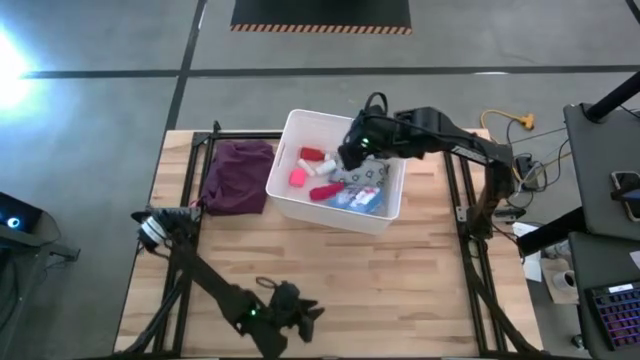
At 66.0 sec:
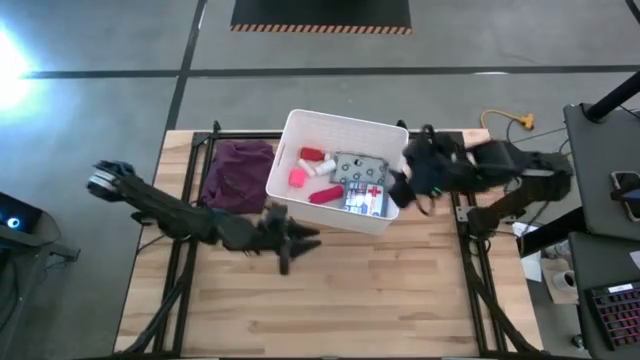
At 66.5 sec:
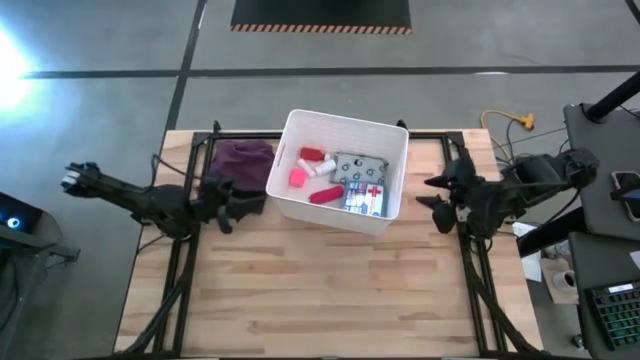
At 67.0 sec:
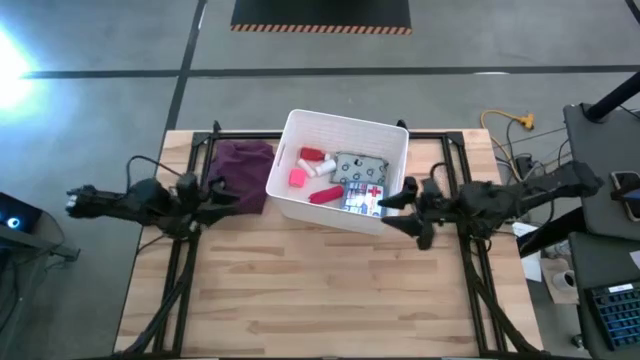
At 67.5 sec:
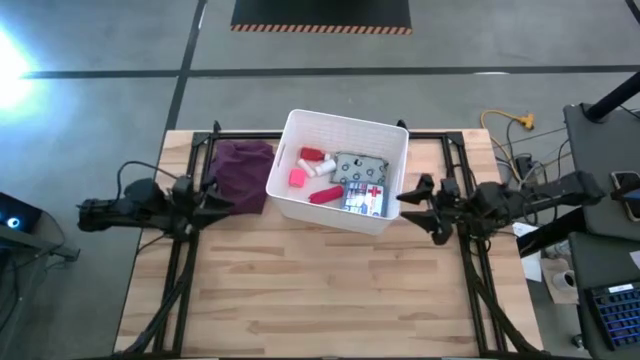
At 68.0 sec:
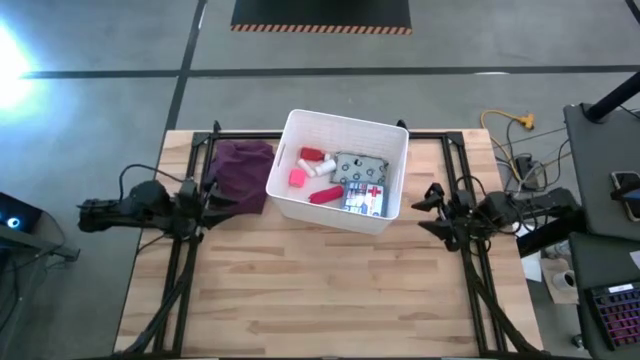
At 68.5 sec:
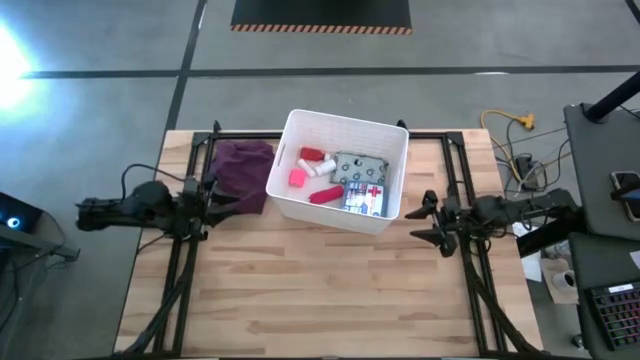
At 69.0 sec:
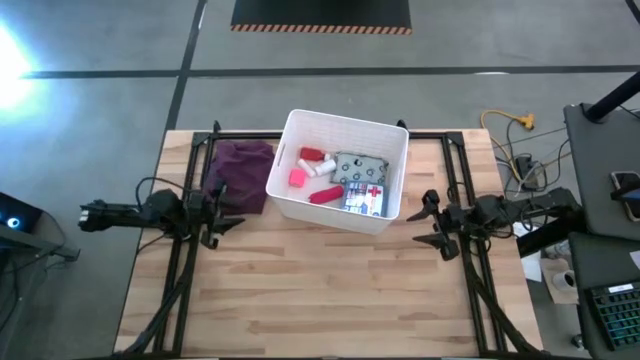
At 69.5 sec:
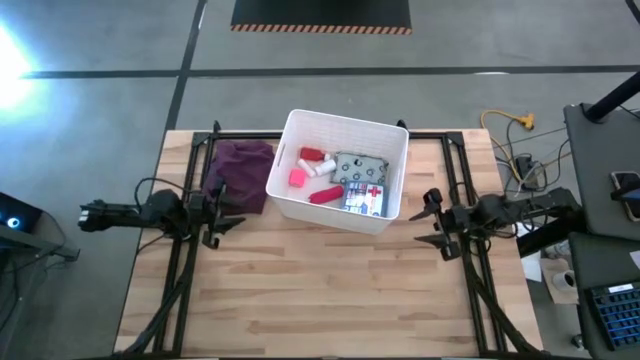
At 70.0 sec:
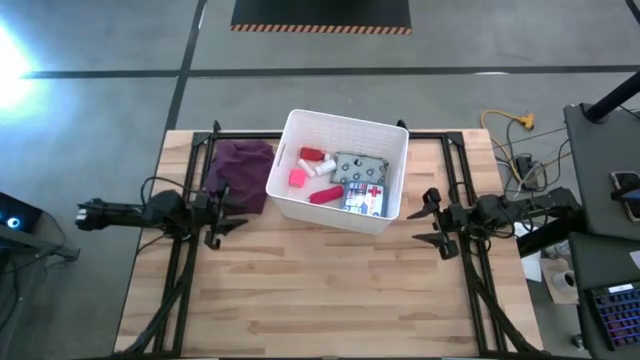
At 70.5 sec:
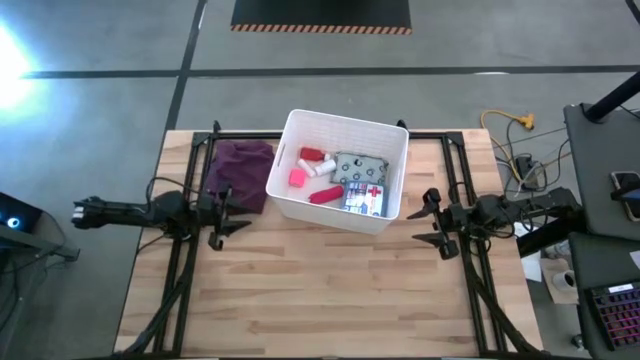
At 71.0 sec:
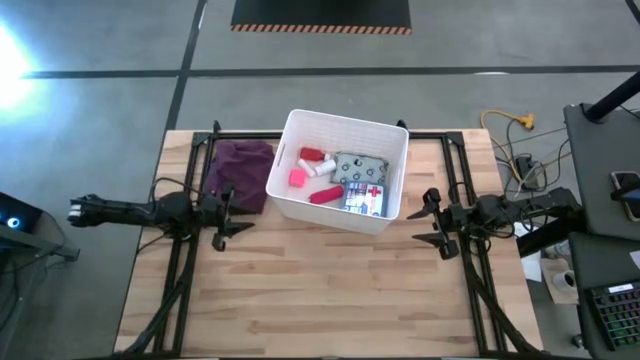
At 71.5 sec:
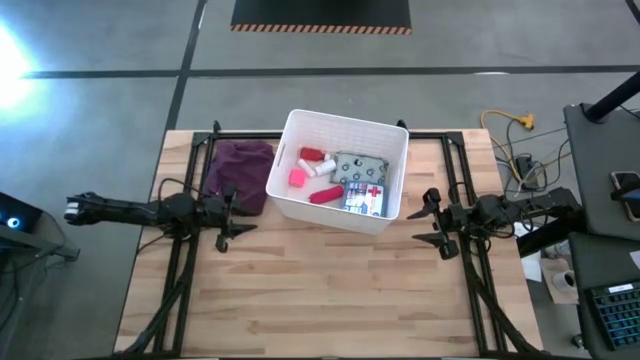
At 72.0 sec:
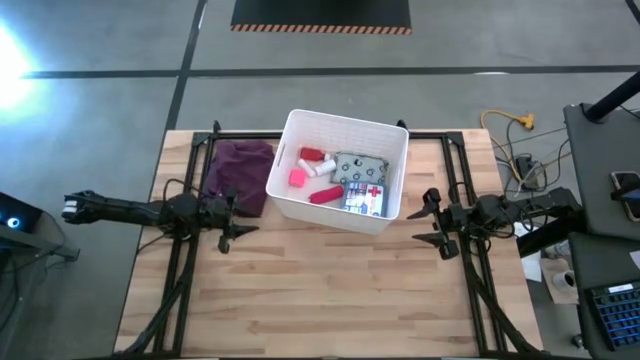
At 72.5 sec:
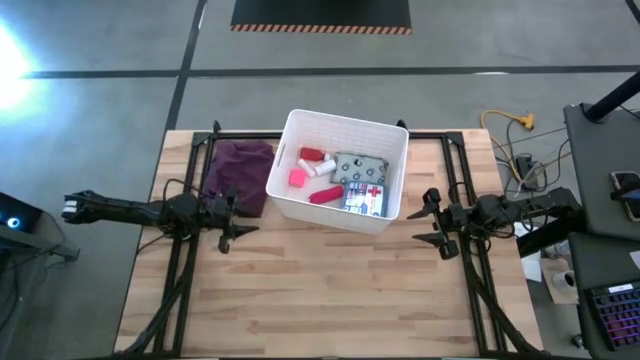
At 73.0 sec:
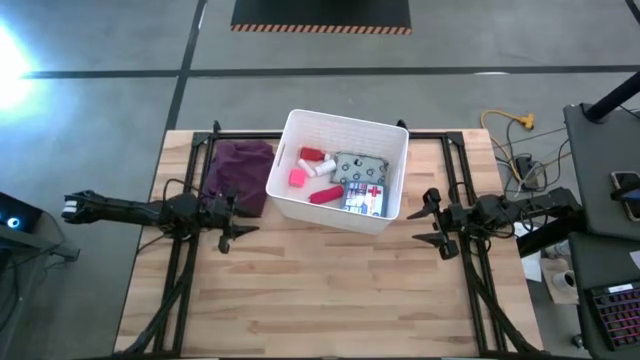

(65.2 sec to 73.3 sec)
Task: Pick & place medical supplies in basket/bin
Return to Home Position

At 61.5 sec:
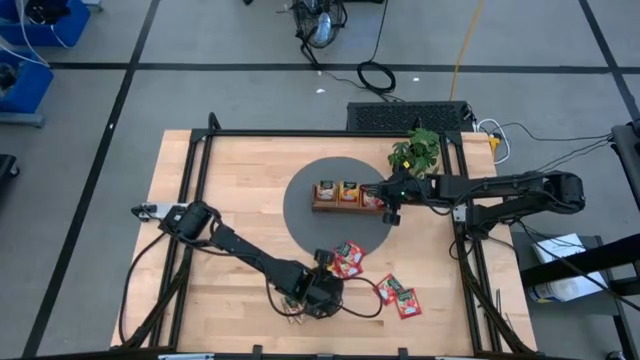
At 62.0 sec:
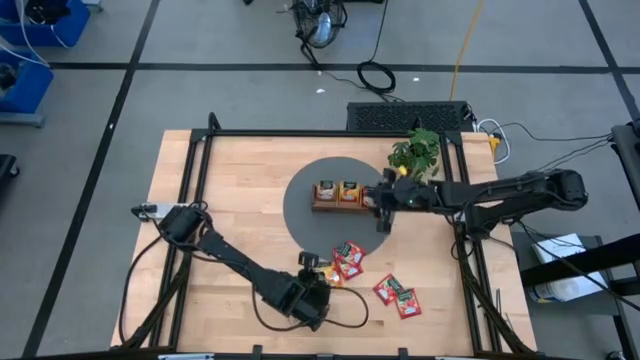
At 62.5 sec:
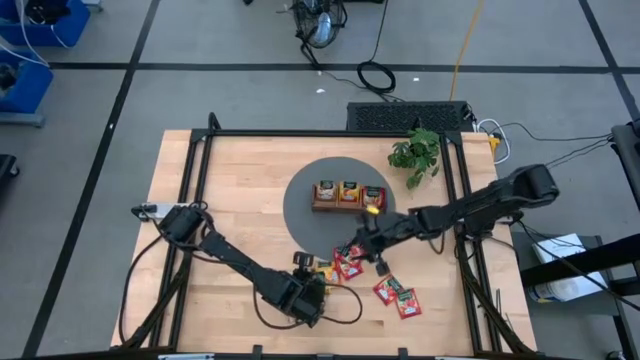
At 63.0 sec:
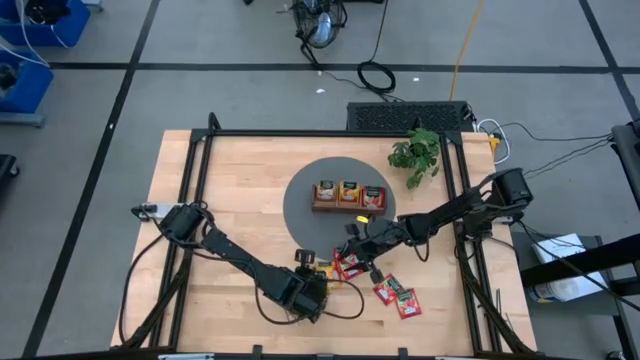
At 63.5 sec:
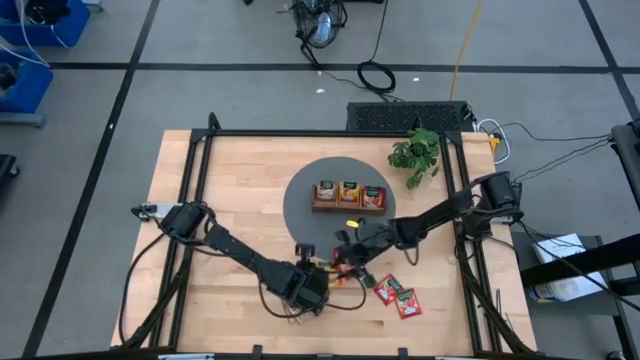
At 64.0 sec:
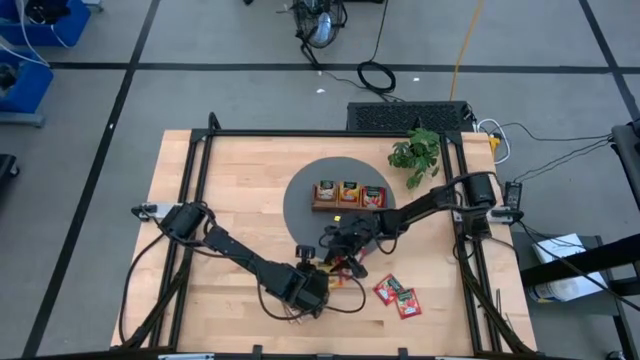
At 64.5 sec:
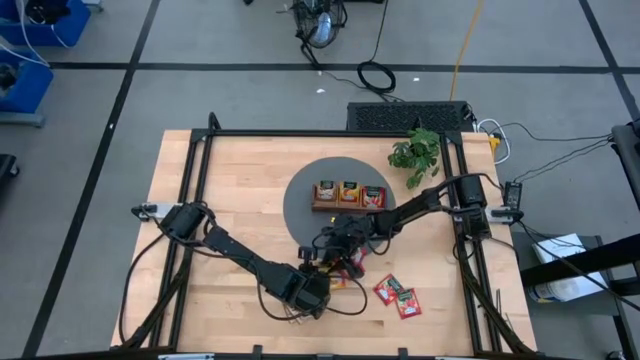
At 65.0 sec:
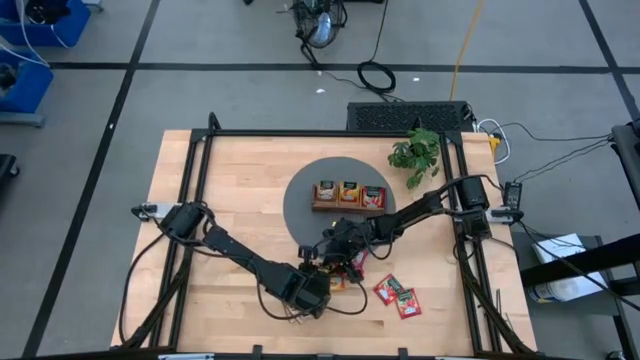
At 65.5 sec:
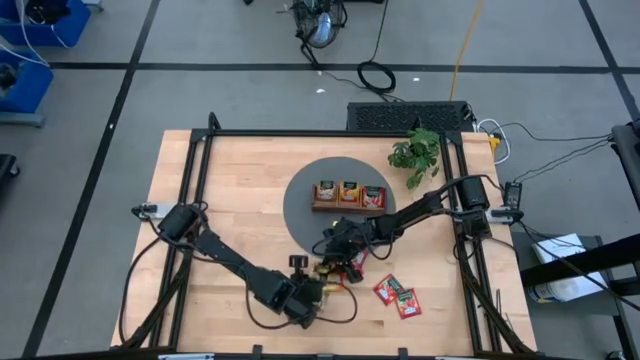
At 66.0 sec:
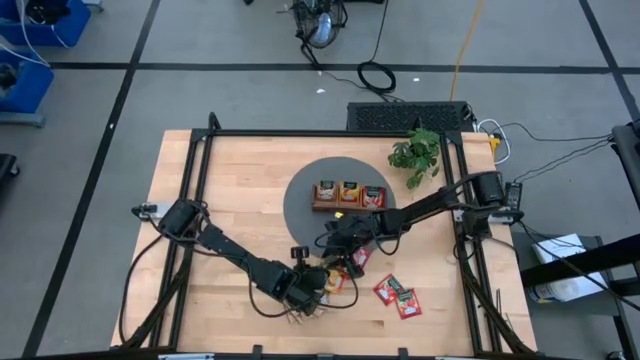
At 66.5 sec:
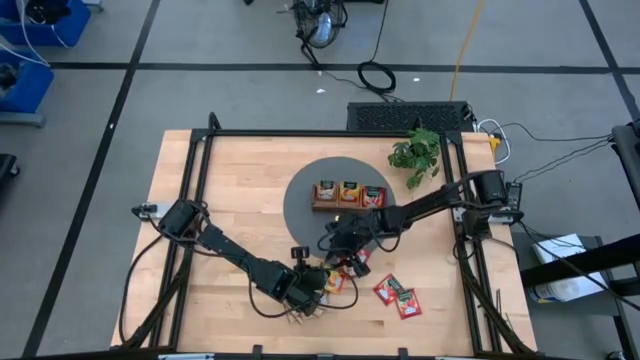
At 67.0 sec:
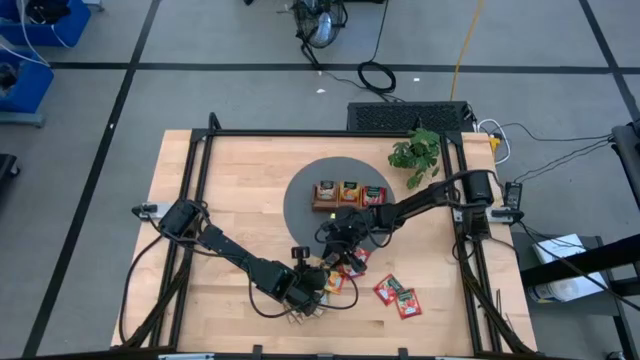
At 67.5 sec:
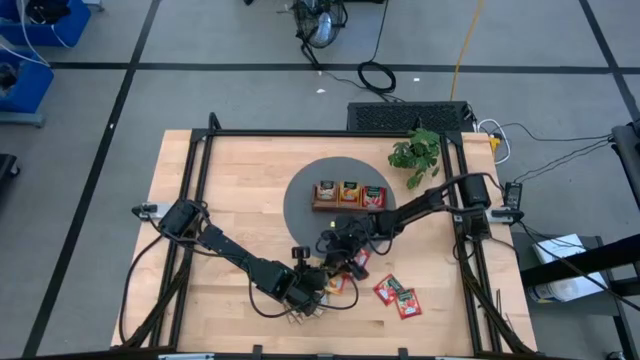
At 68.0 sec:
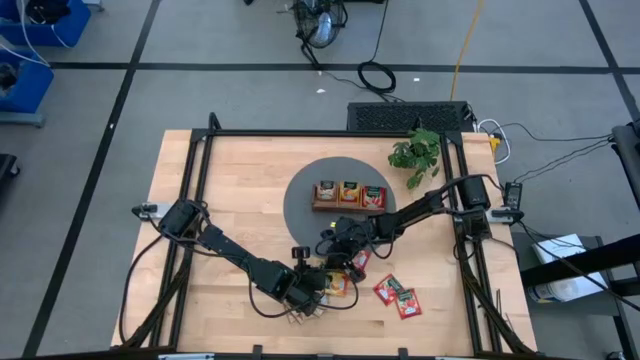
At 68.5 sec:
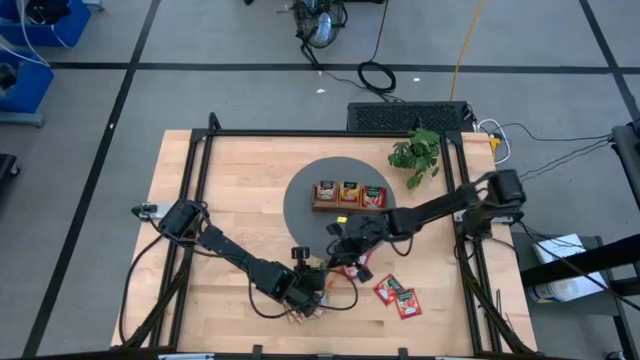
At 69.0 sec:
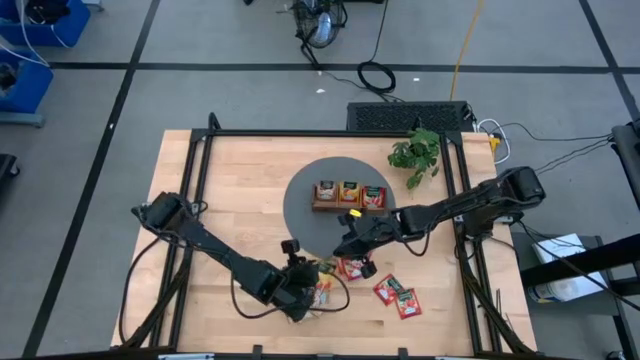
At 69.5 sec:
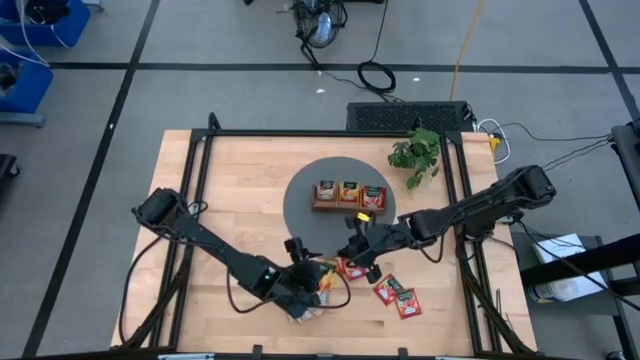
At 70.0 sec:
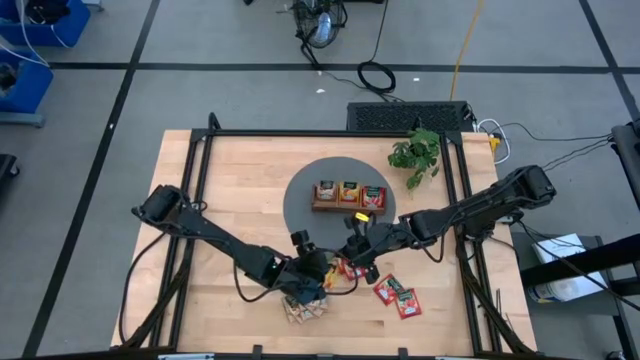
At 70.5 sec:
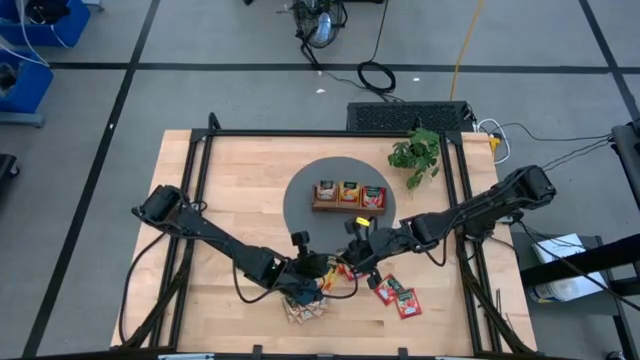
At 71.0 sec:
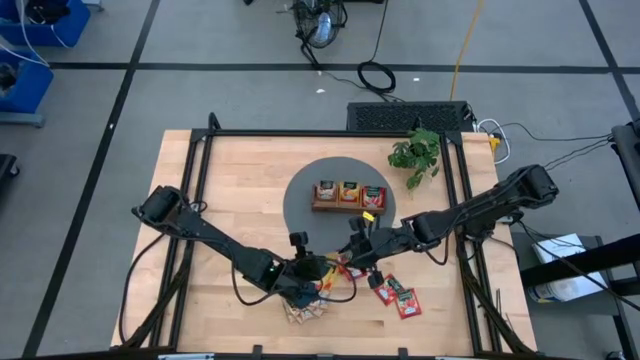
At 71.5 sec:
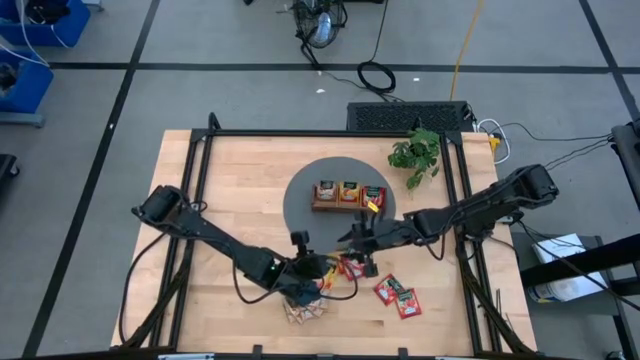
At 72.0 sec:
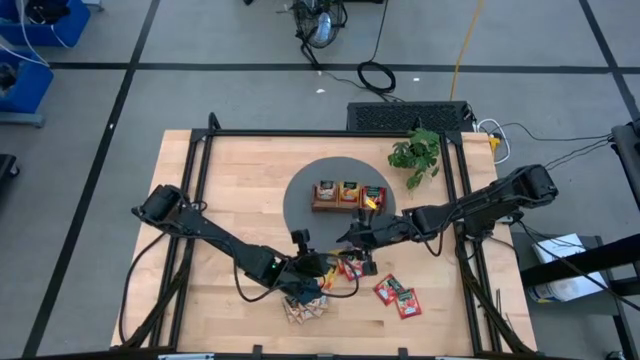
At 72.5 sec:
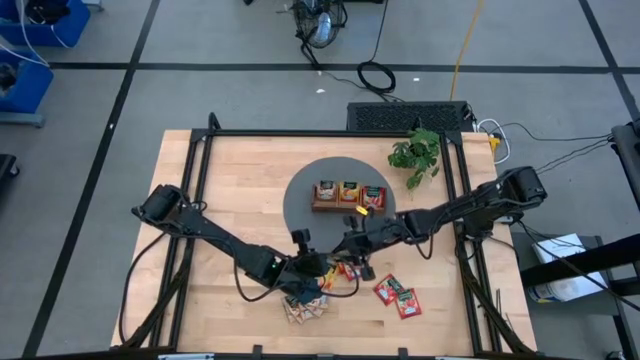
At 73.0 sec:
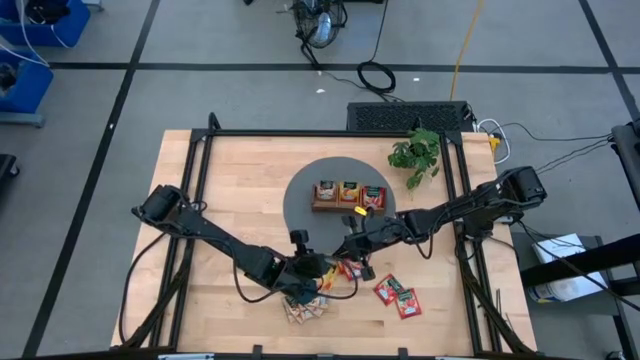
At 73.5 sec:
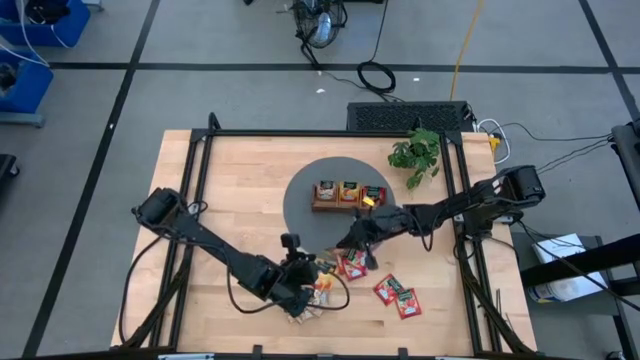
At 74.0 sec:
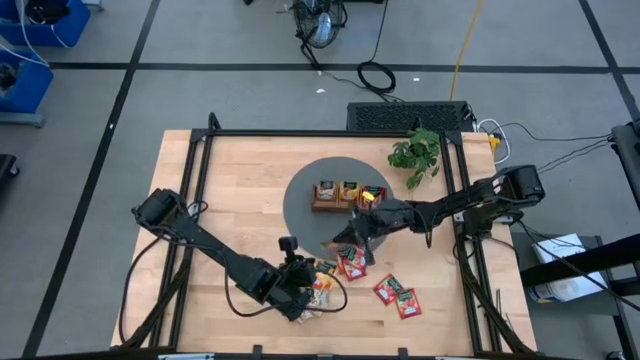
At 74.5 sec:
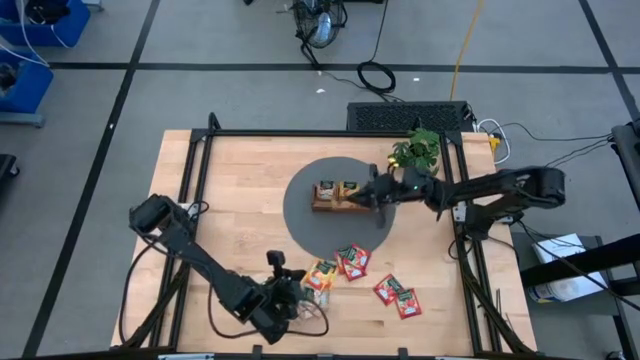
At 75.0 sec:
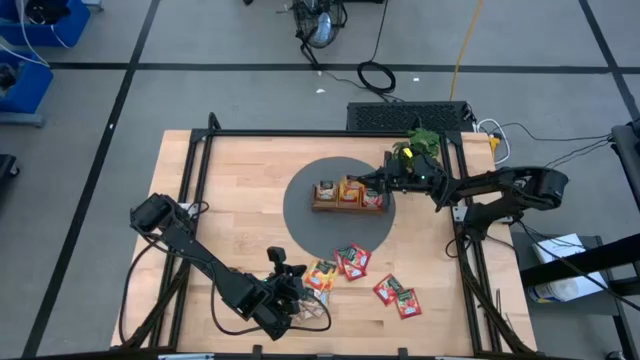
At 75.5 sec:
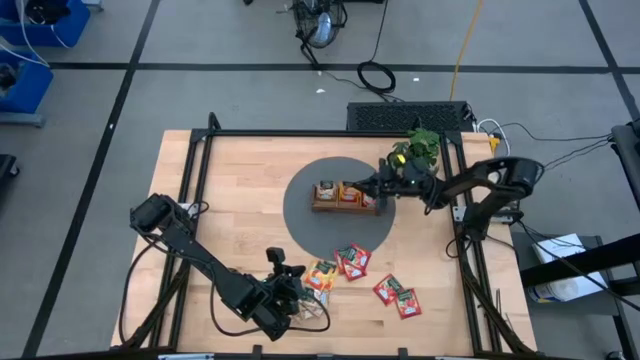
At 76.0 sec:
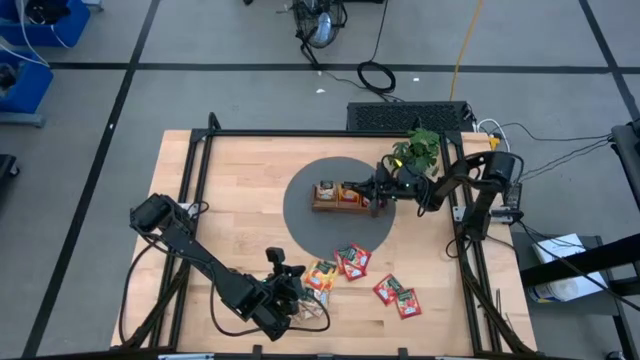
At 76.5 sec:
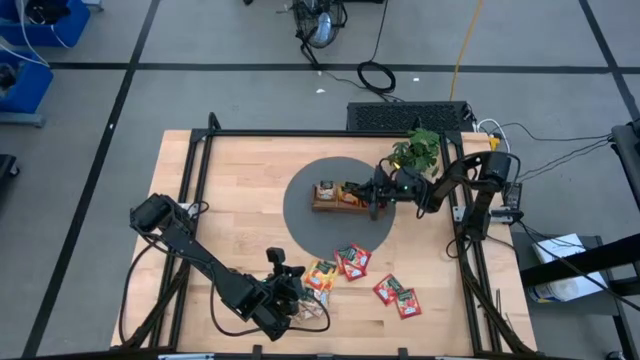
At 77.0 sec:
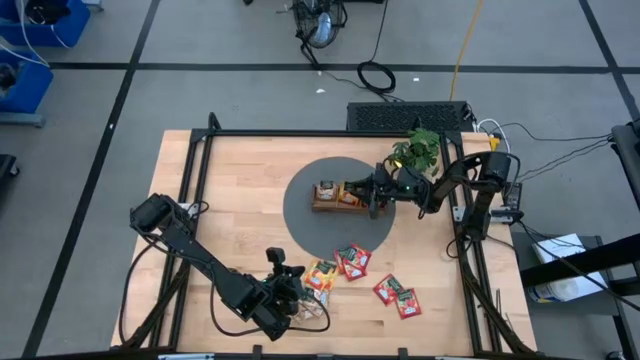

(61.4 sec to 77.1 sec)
Task: Pick & Place Tea
Put the yellow tea bag to the middle section into the wooden organizer
